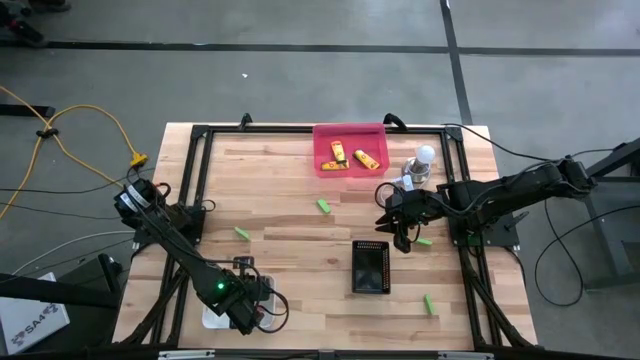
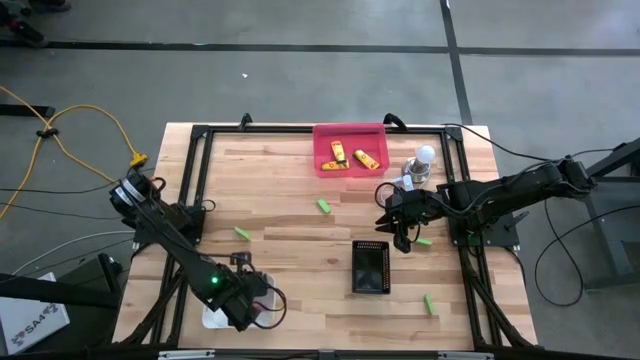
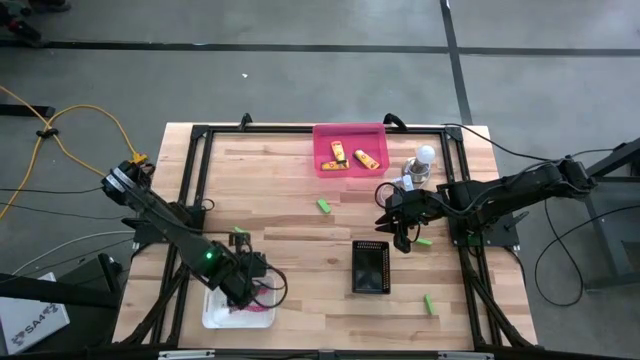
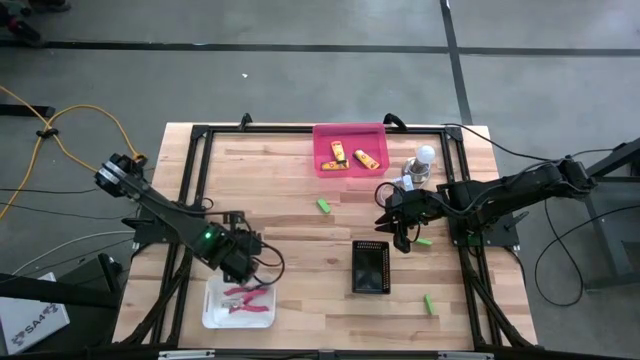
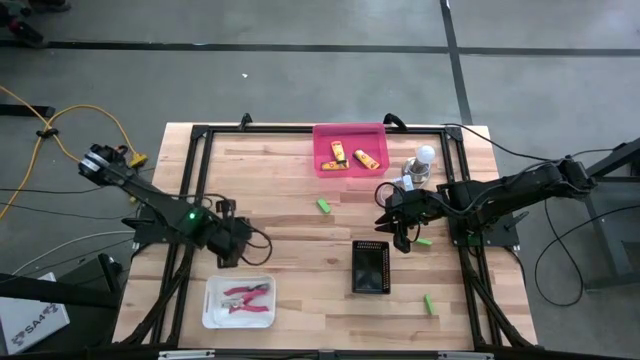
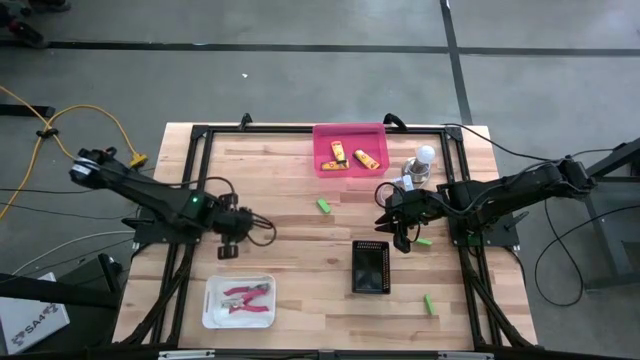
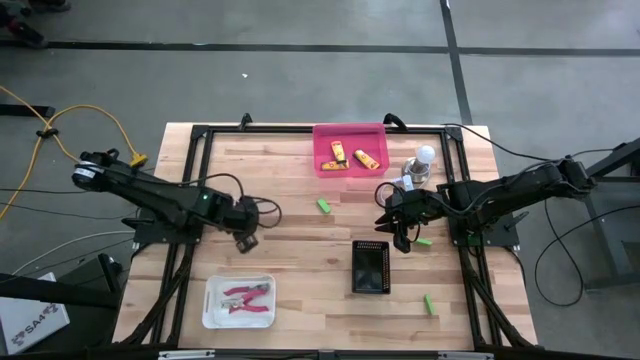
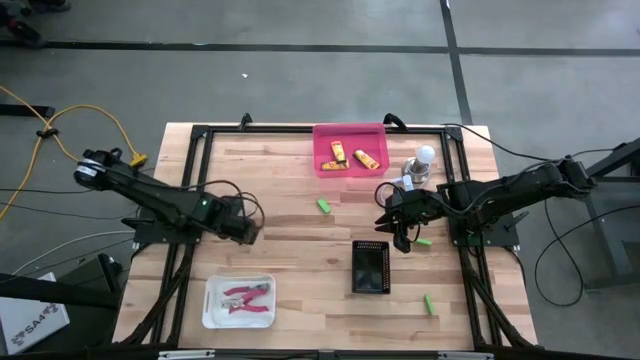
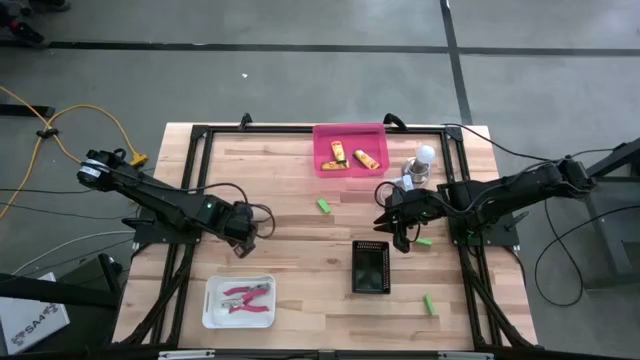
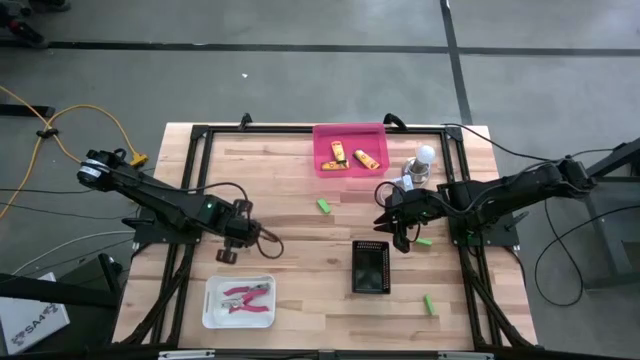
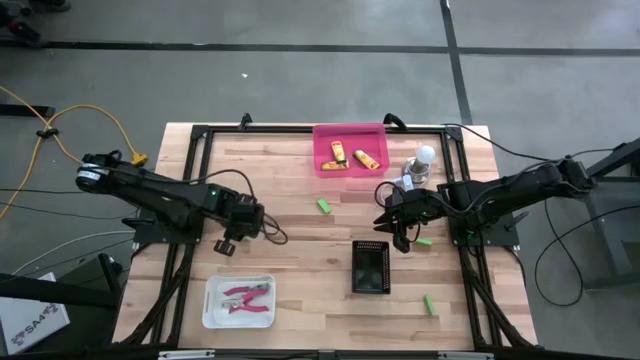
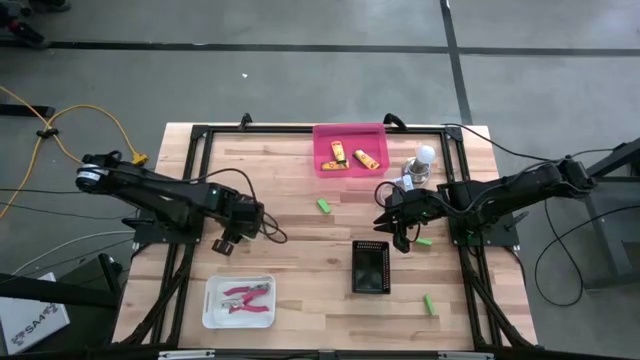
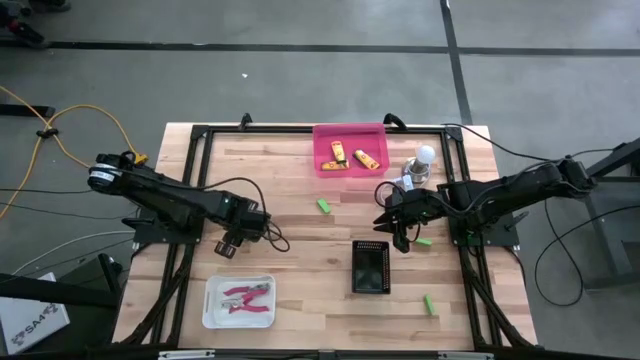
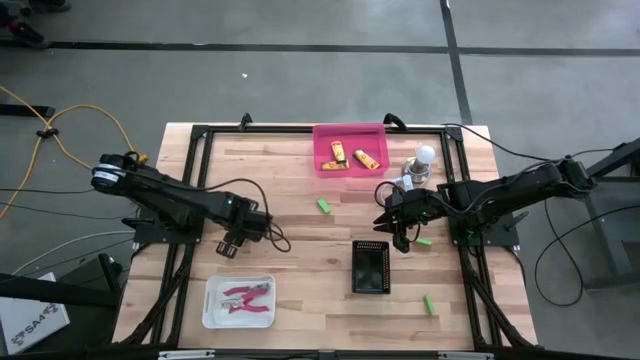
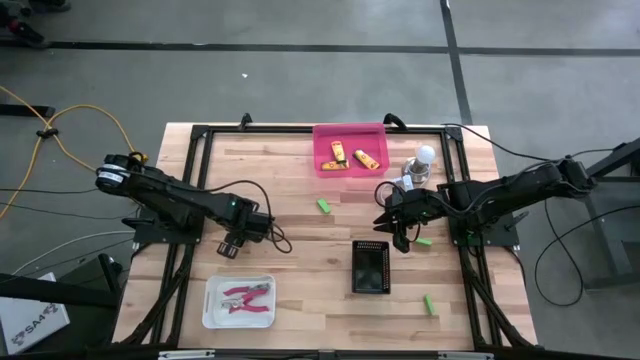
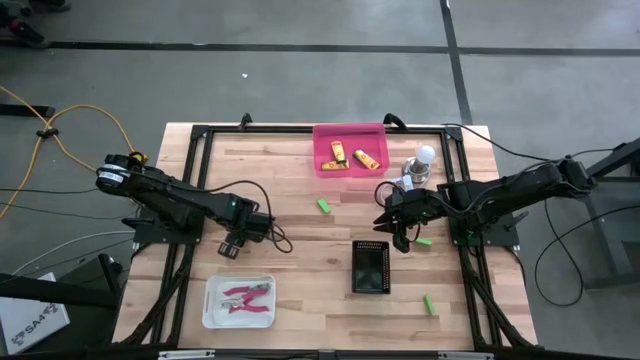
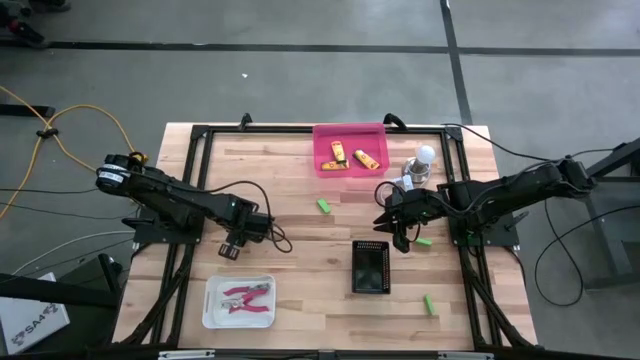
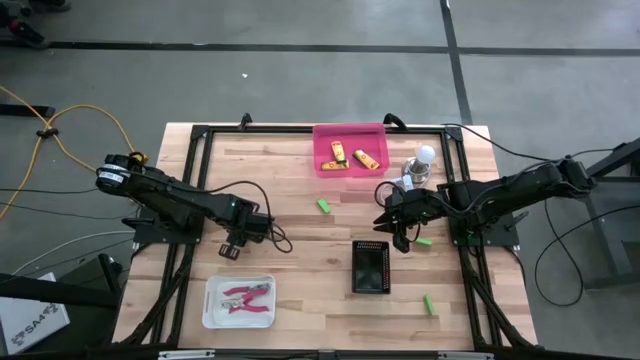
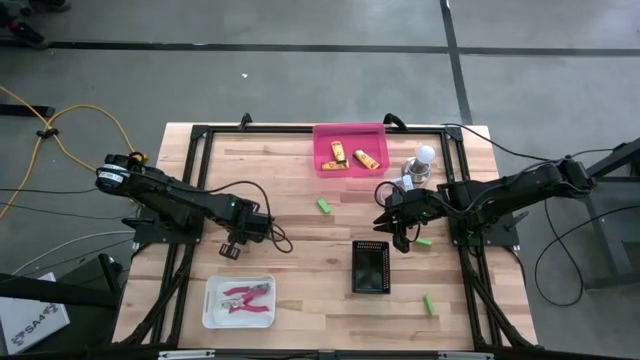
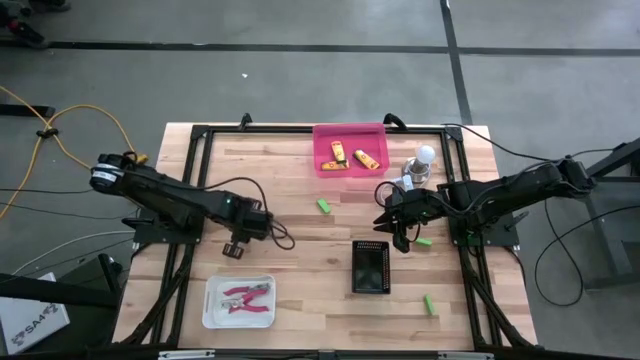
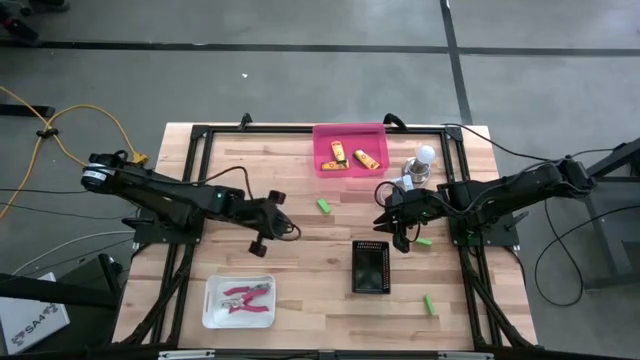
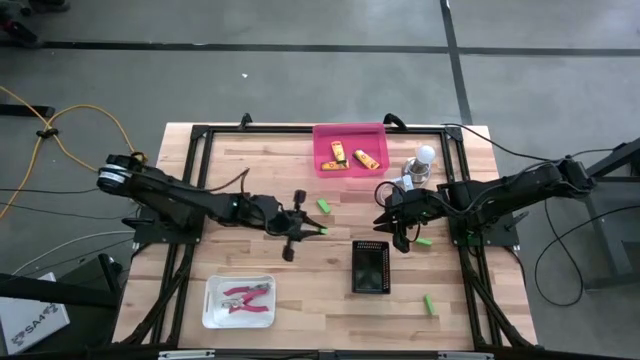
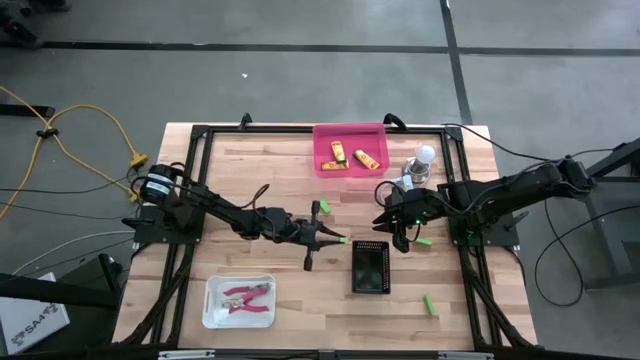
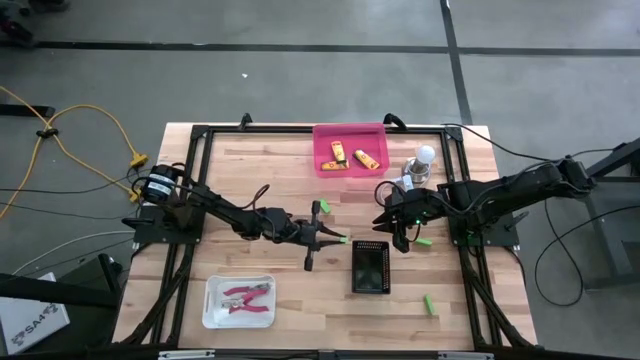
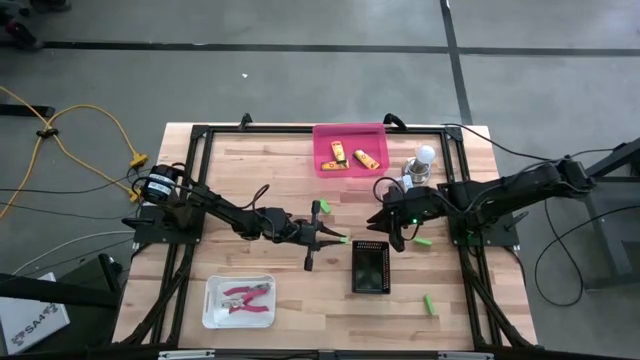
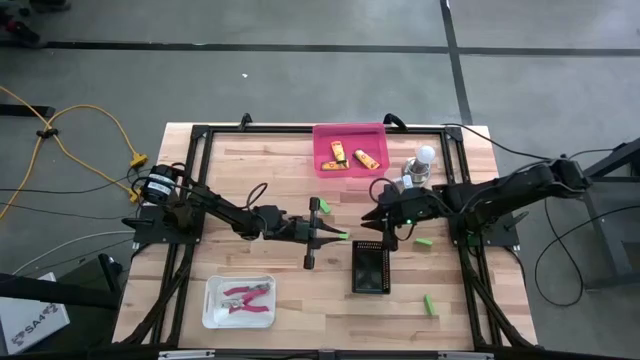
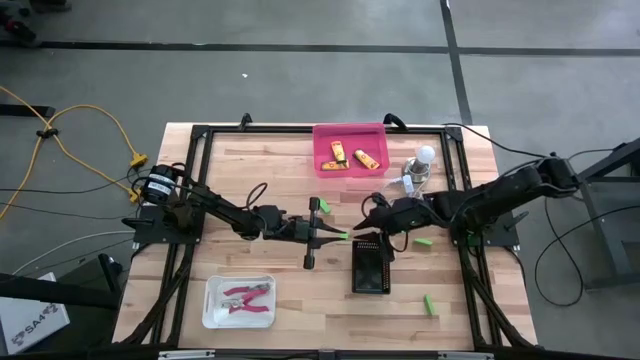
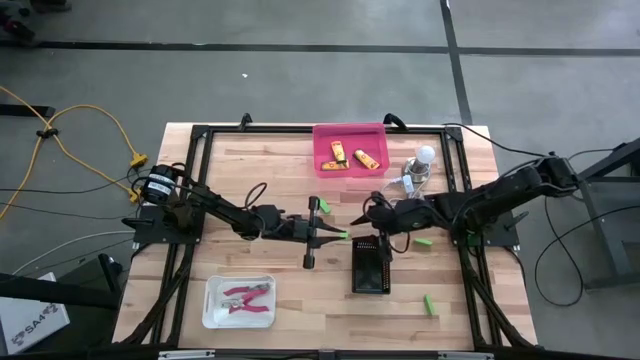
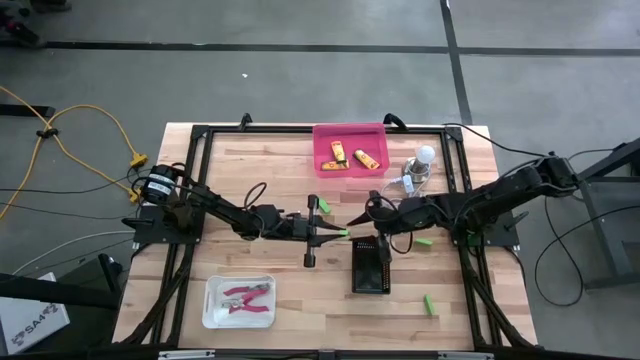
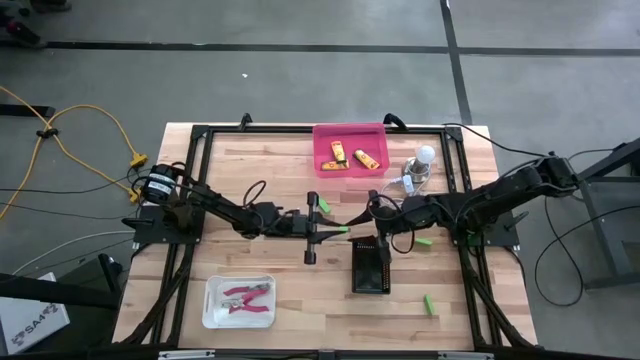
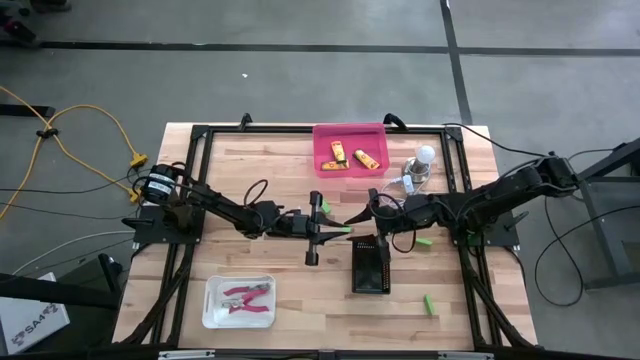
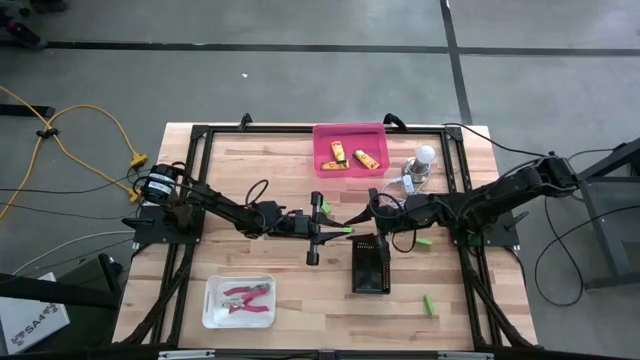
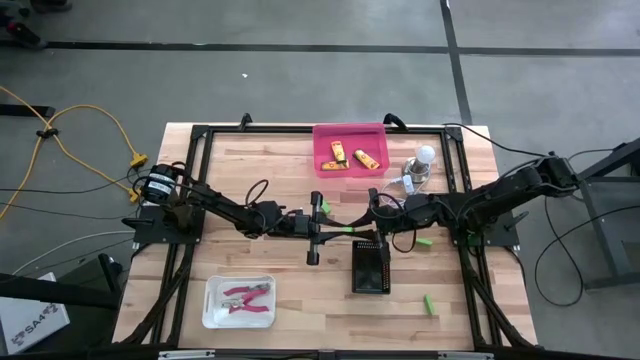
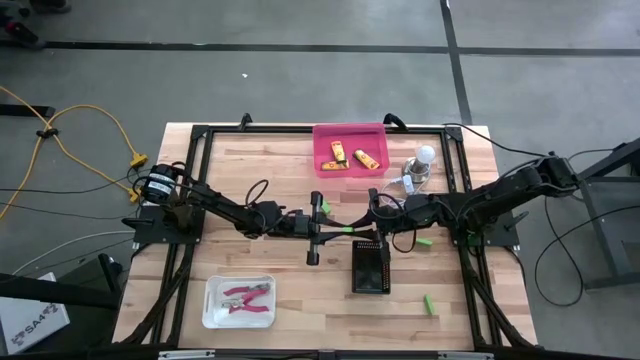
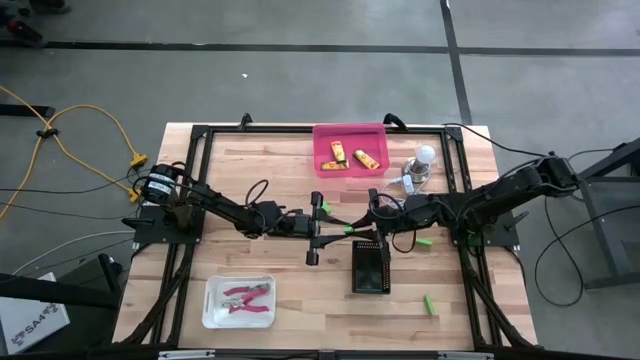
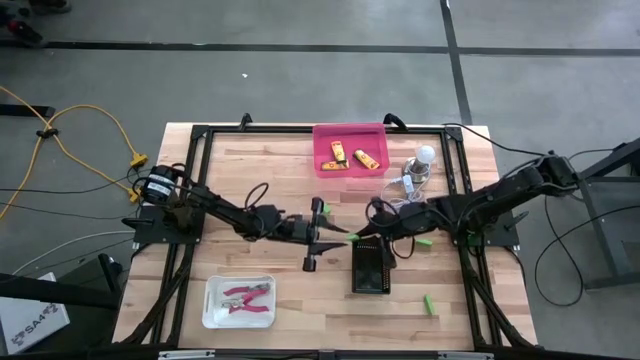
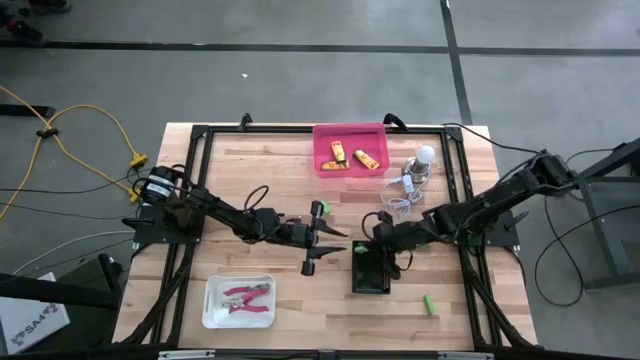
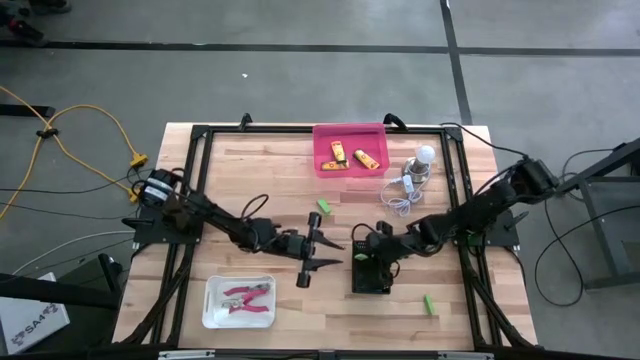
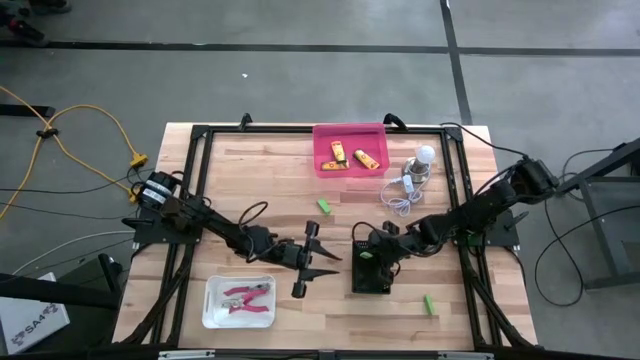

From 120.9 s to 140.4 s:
Task: Pick & Place School Supplies
Put the green eraser into the black bin

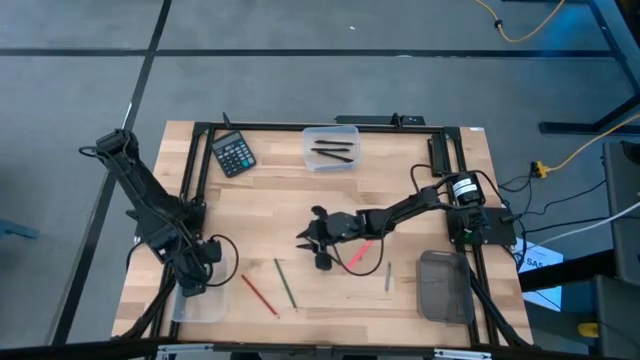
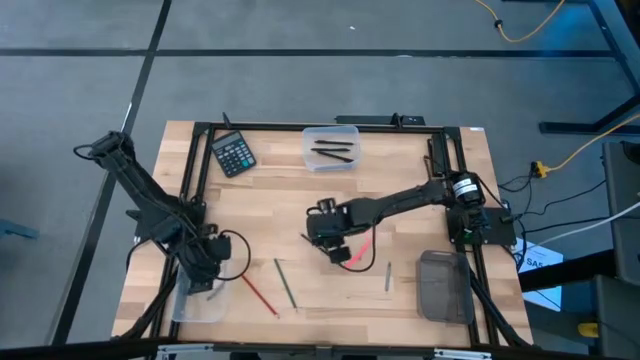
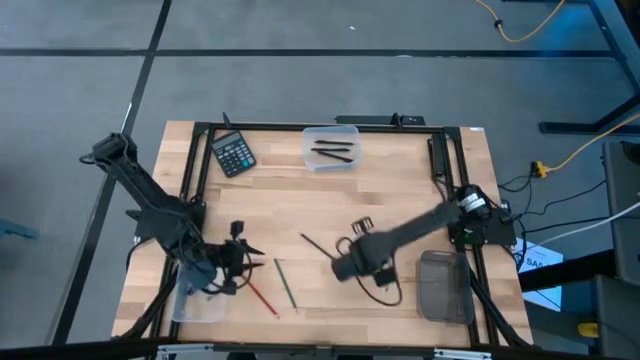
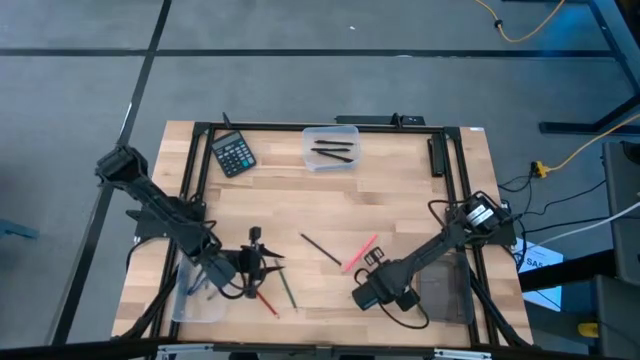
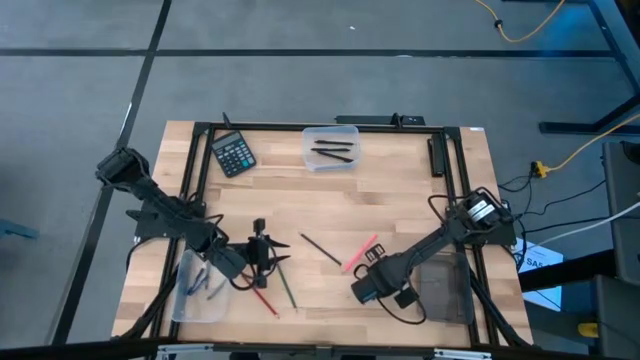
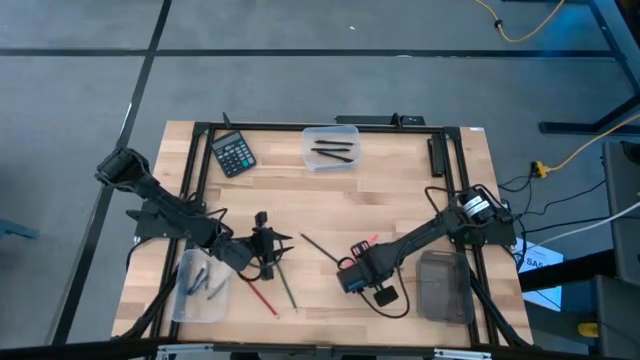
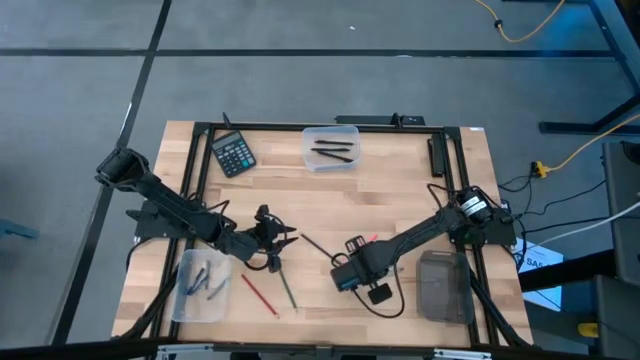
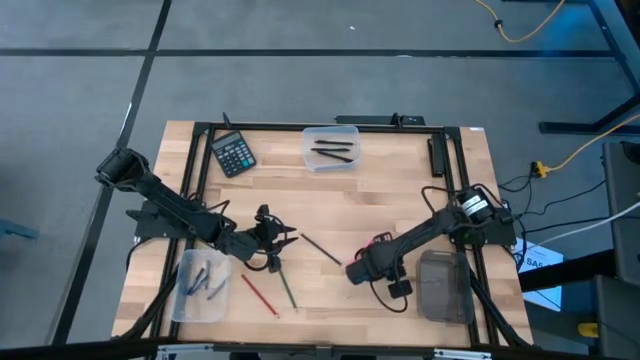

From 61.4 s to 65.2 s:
Task: Sort crayons/erasers/pens/pencils in bins
Put the gray crayon into the bottom transparent bin
